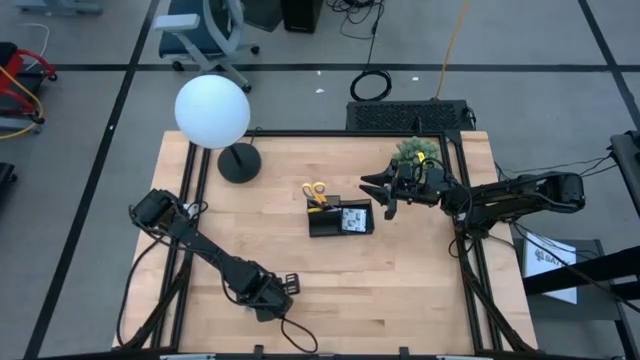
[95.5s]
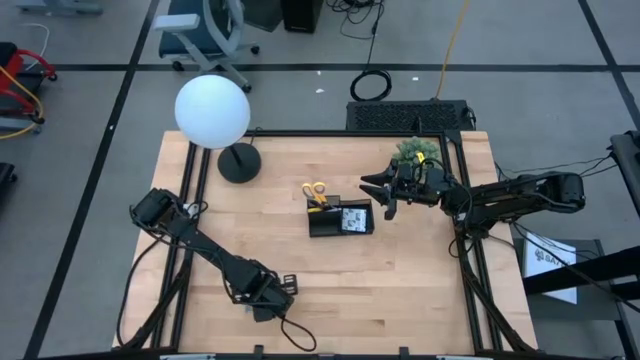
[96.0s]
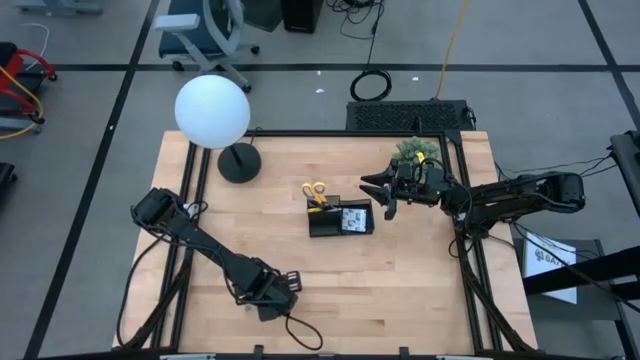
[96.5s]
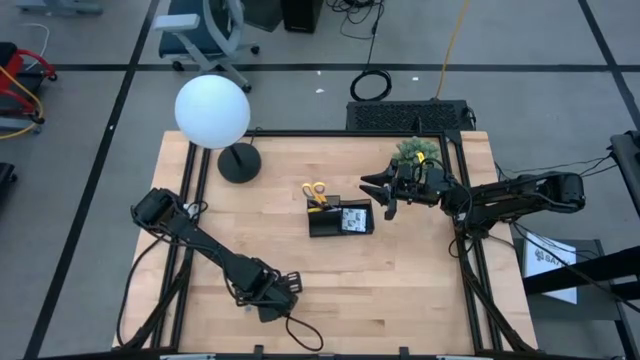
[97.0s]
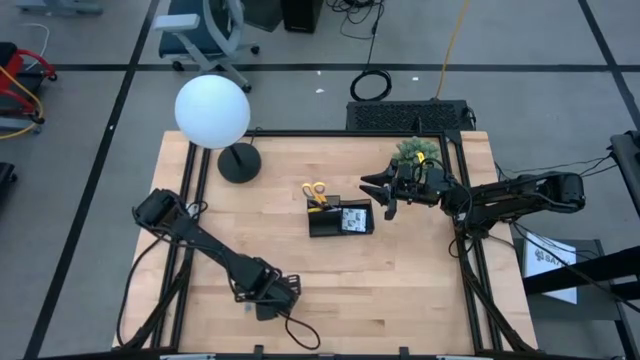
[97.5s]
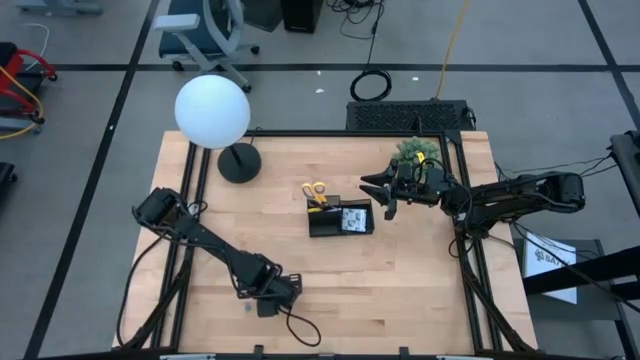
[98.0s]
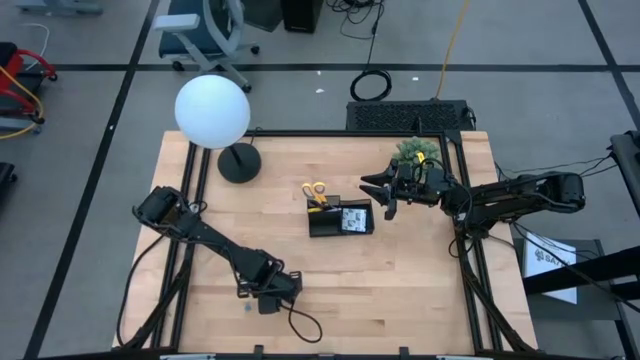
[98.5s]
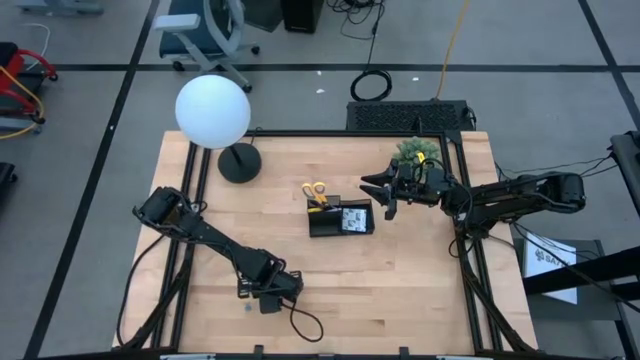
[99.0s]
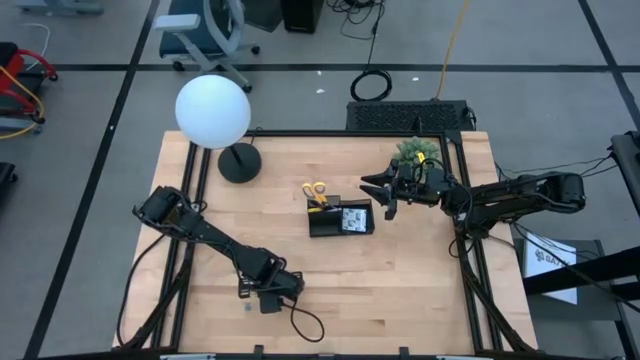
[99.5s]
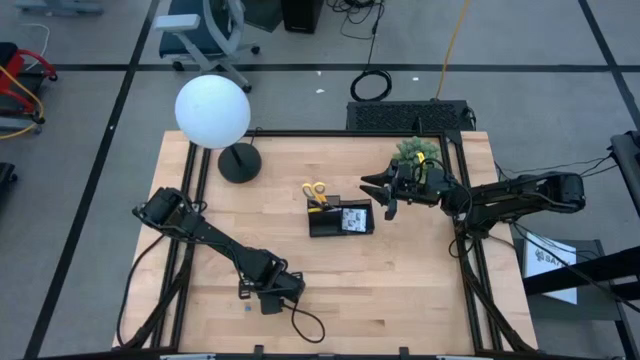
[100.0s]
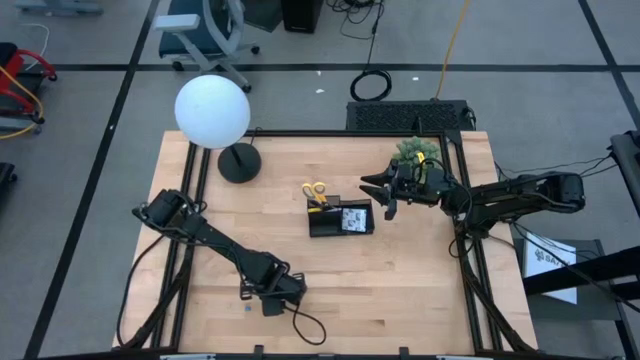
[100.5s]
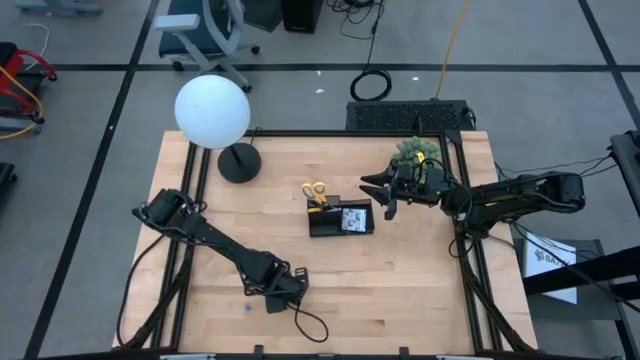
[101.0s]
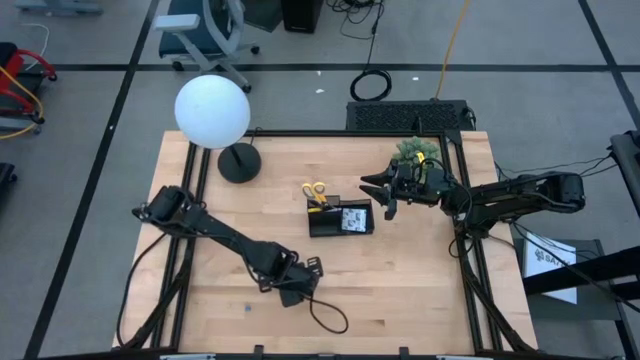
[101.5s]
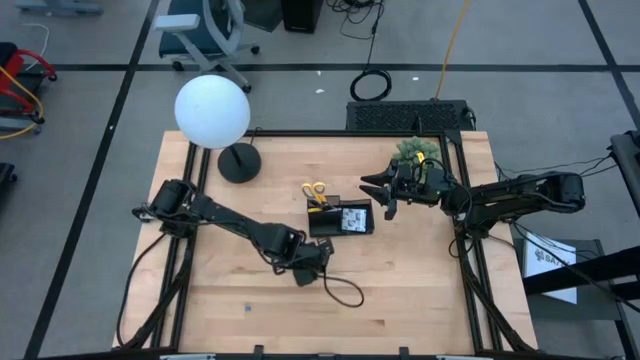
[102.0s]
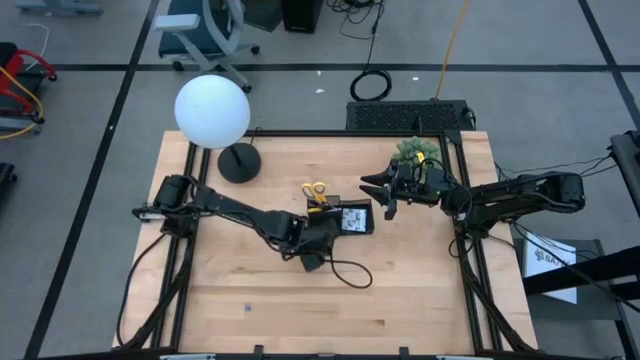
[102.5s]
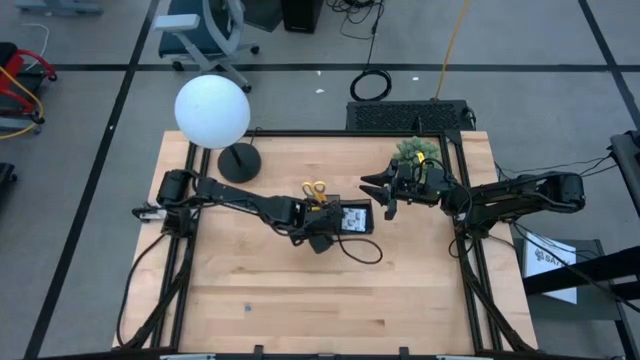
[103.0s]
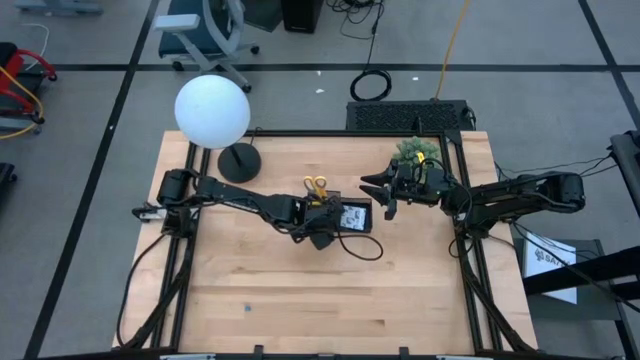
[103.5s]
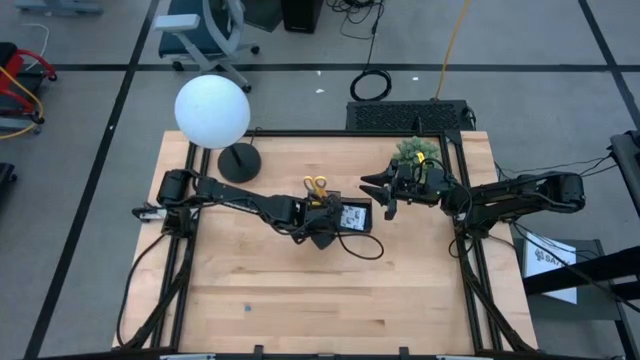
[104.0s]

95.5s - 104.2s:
Task: Pick and place office supplies into organizer
Put the orange eraser into the bottom left compartment of the black desk organizer

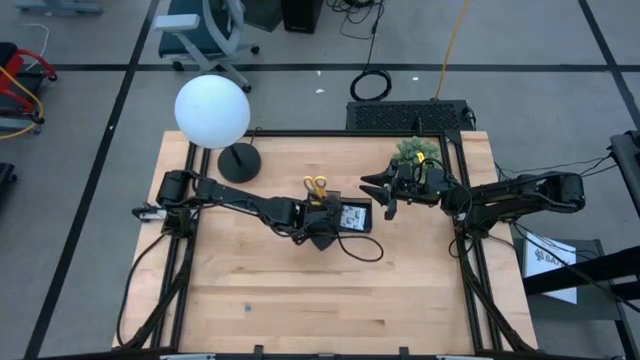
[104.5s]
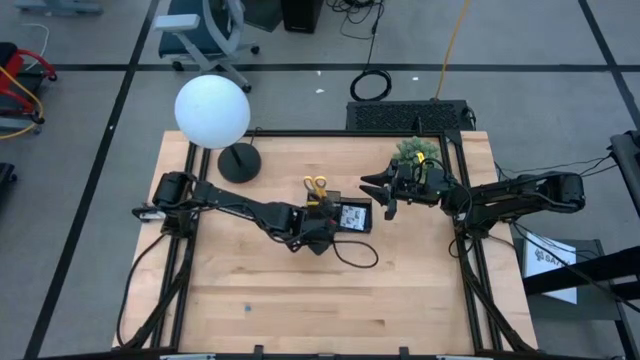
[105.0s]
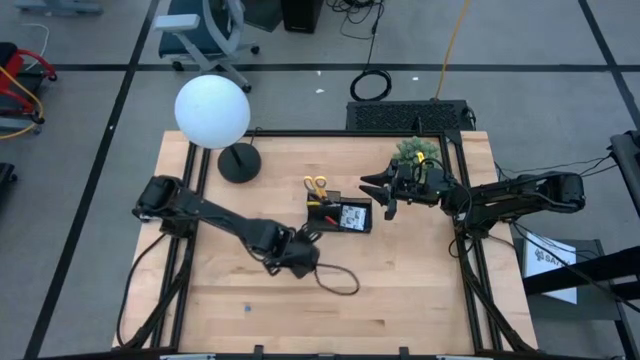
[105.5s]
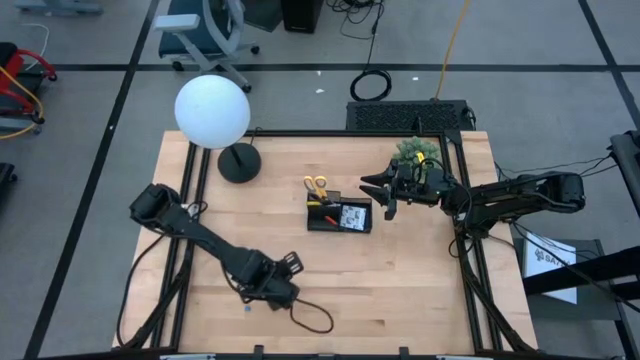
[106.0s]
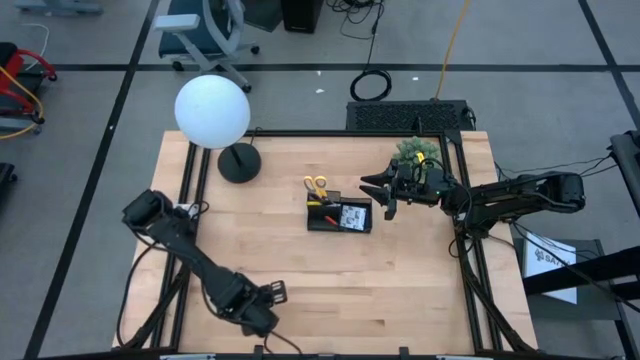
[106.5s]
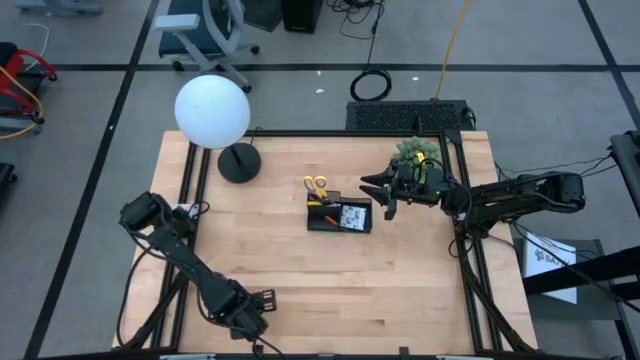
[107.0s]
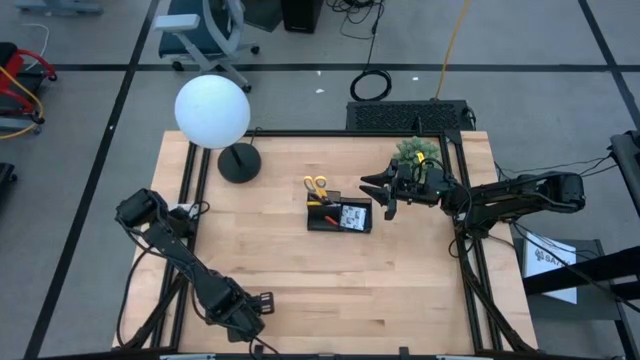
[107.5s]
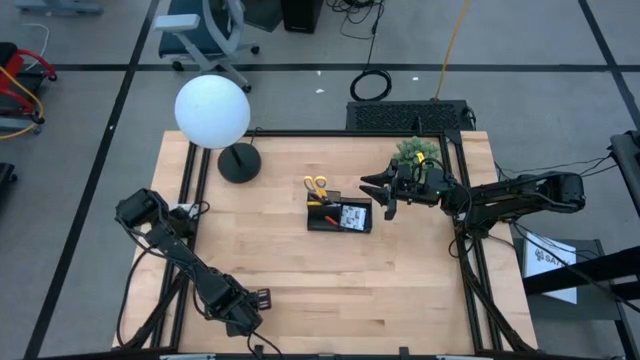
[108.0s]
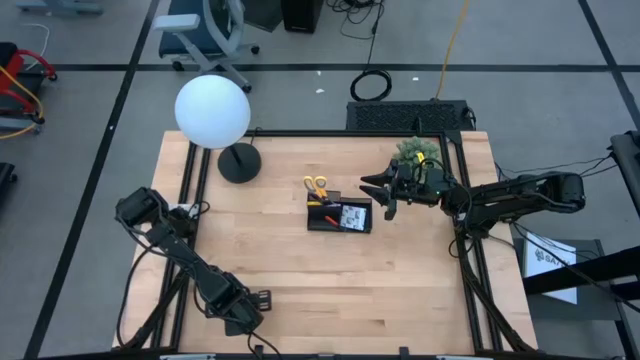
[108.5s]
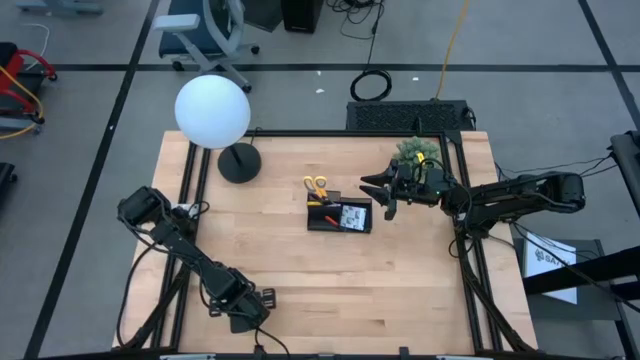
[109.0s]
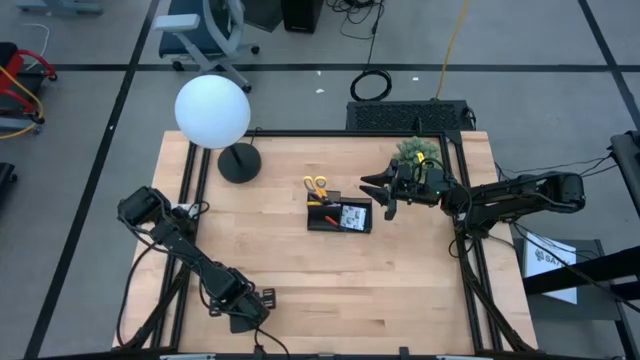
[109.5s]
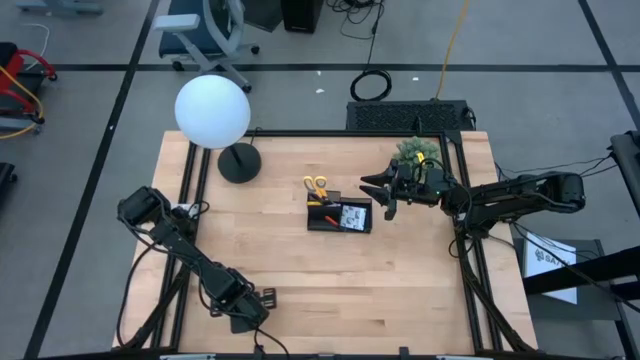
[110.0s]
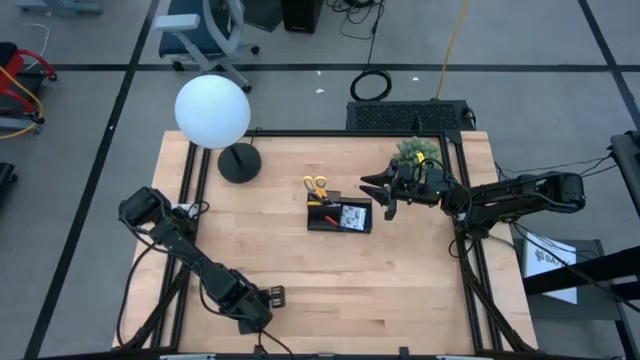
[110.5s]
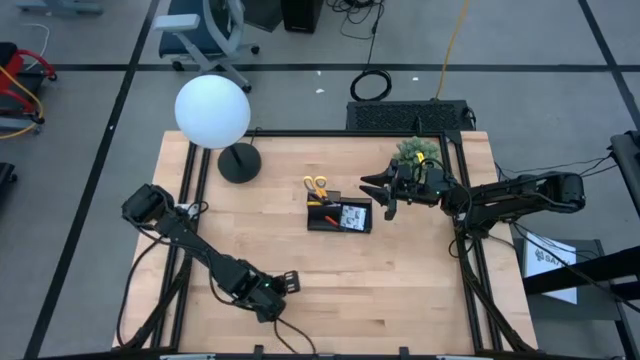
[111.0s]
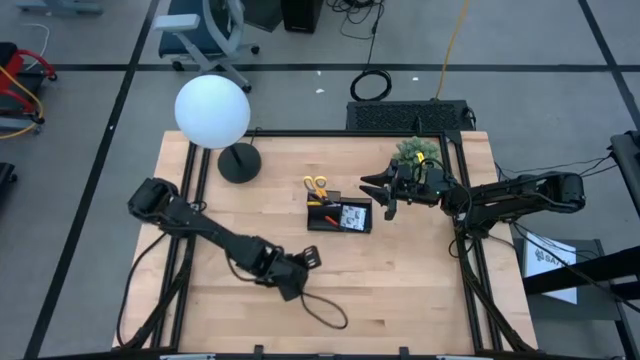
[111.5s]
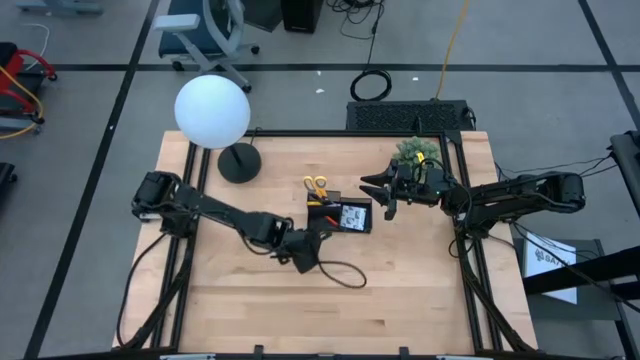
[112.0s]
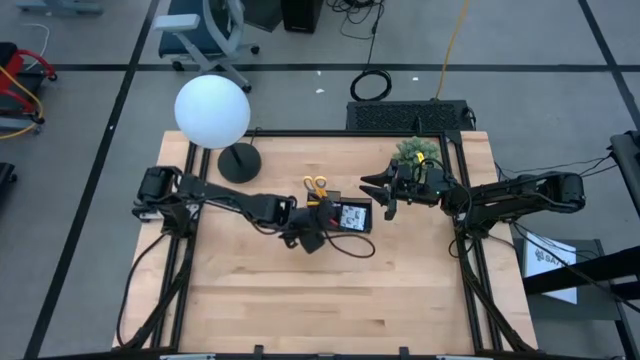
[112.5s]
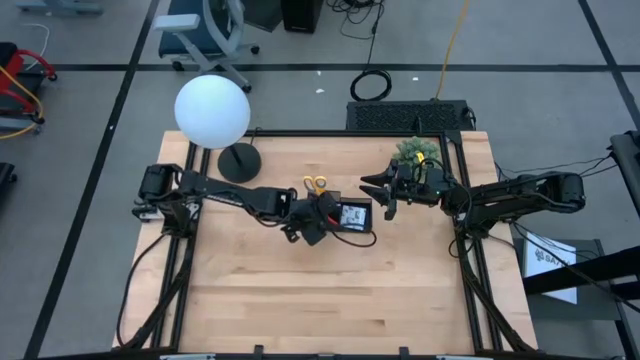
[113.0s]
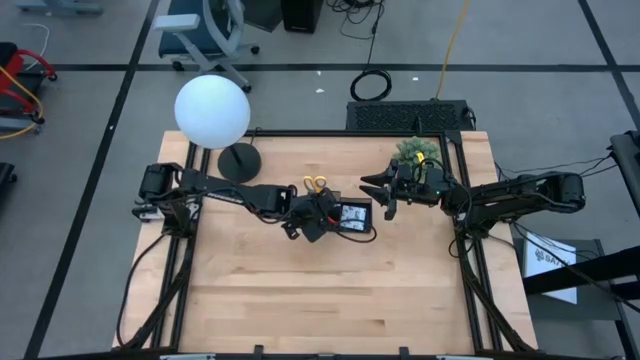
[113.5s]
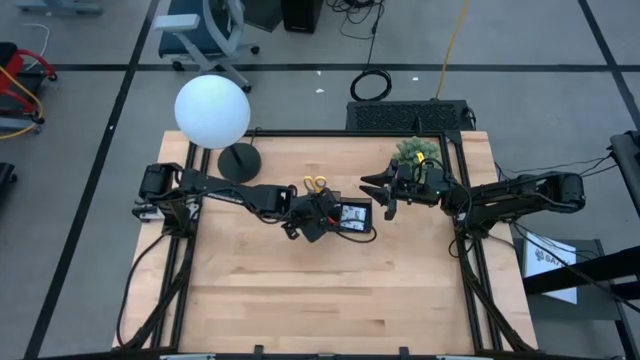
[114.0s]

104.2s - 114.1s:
Put the blue binder clip into the bottom left compartment of the black desk organizer

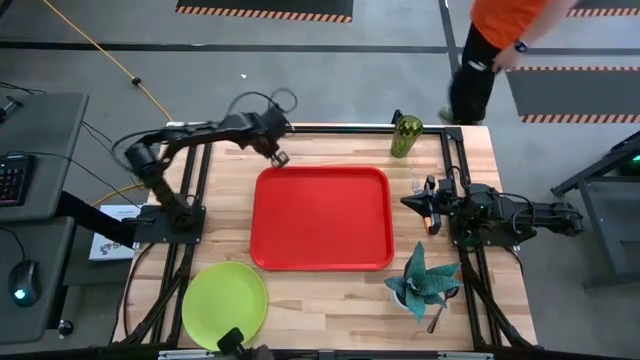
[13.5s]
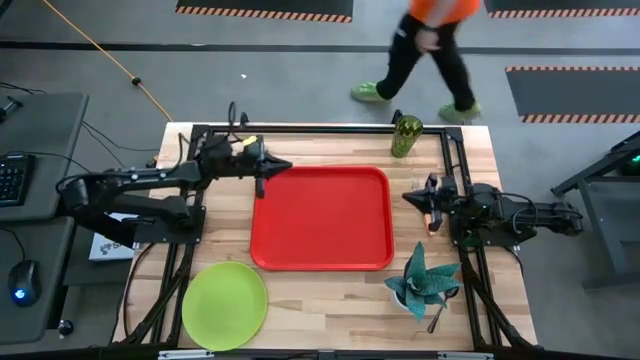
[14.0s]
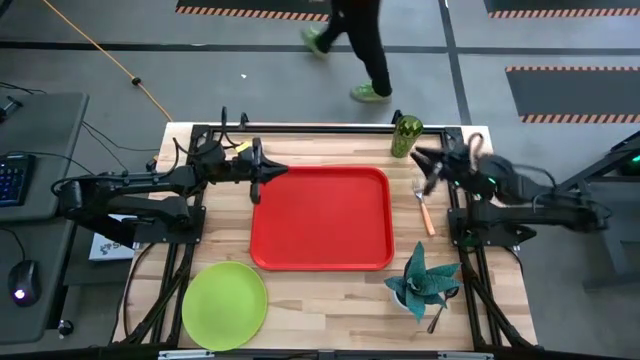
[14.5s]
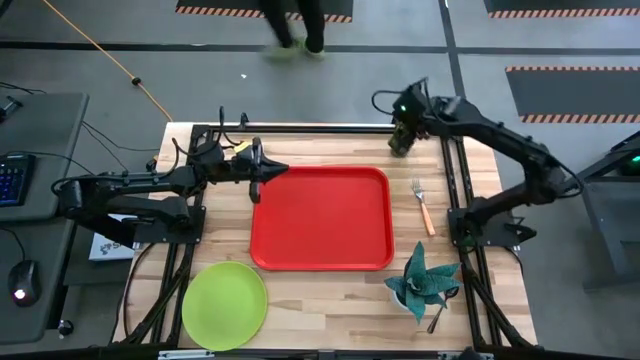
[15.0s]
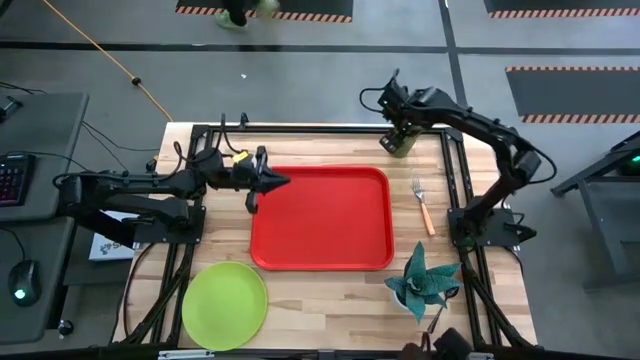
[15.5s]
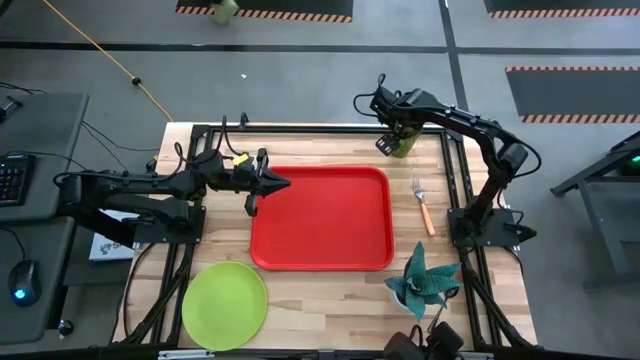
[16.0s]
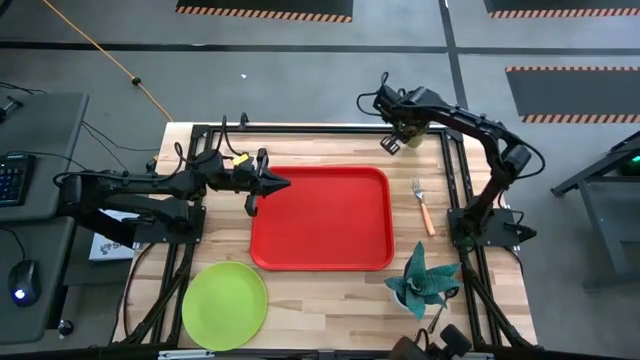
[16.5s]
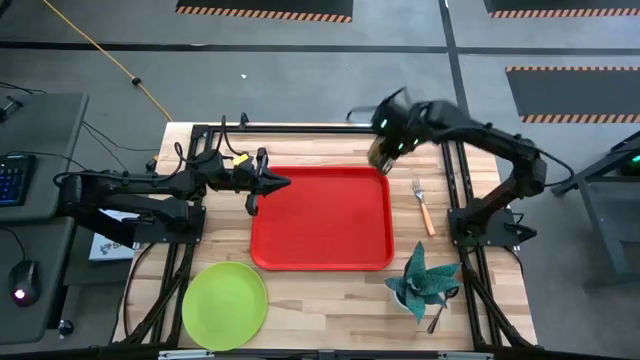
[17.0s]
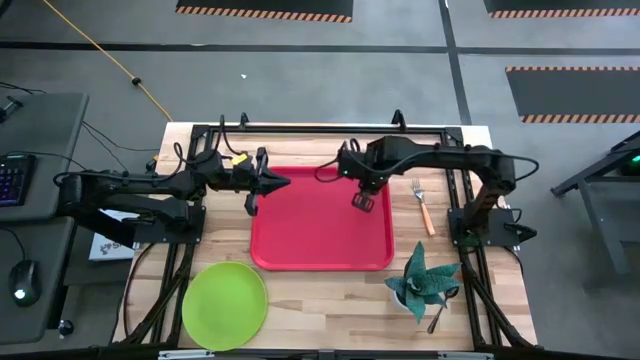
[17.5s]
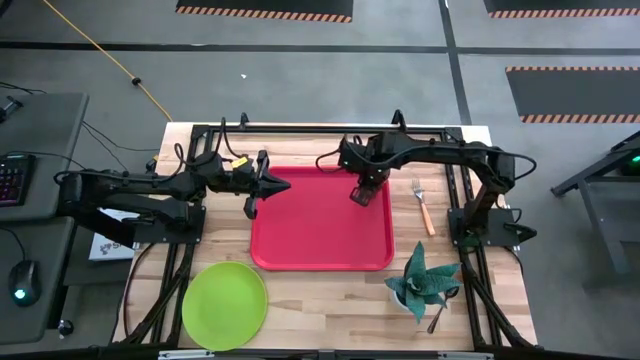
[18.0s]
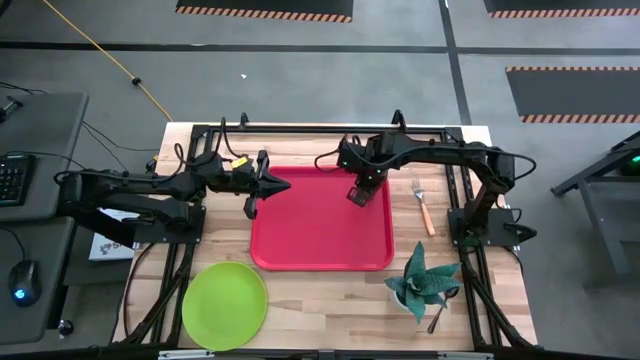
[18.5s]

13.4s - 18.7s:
Task: Pick and place plate/cup/fork/spoon on tray
Put the green cup on the red serving tray
